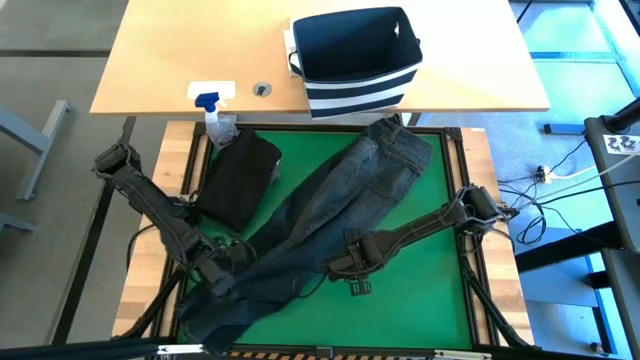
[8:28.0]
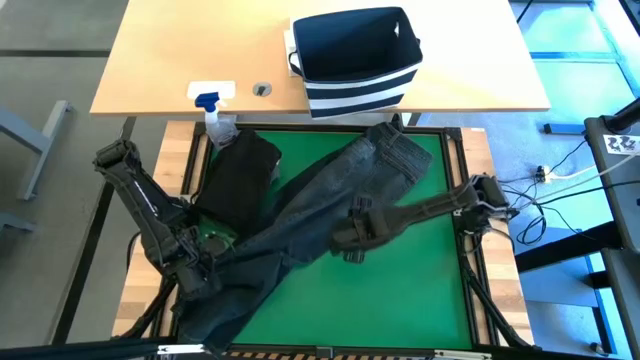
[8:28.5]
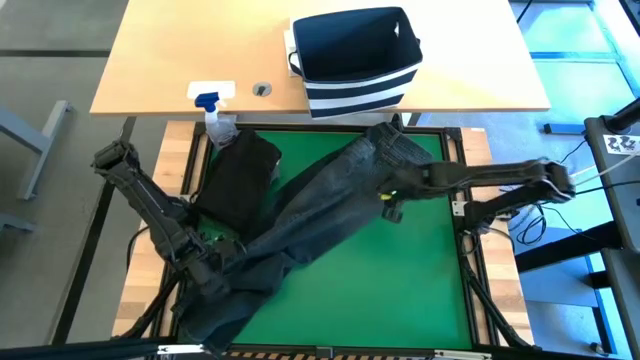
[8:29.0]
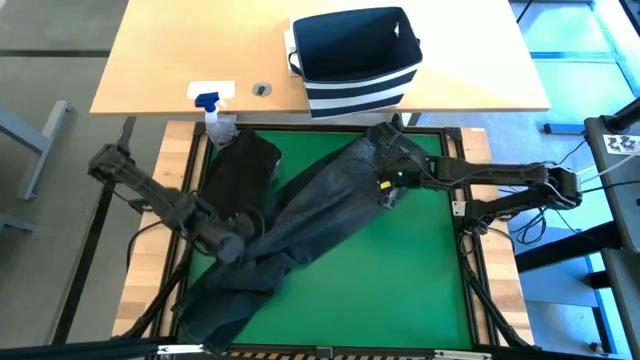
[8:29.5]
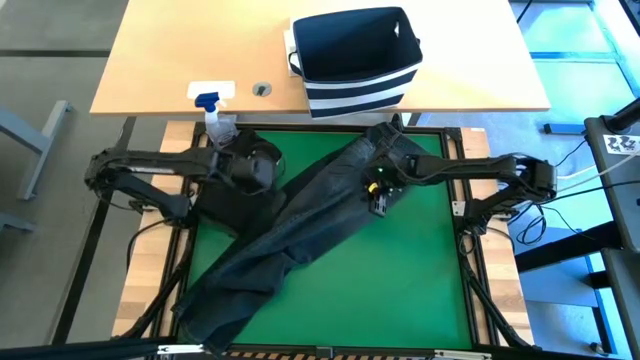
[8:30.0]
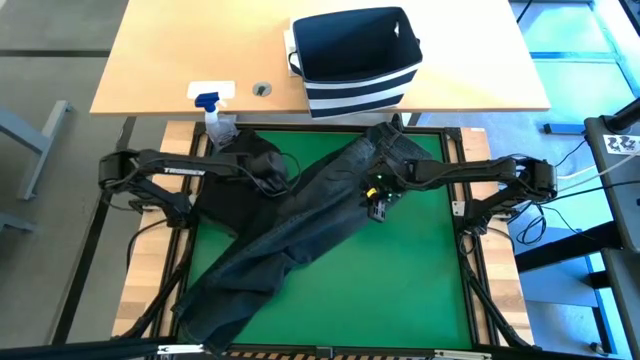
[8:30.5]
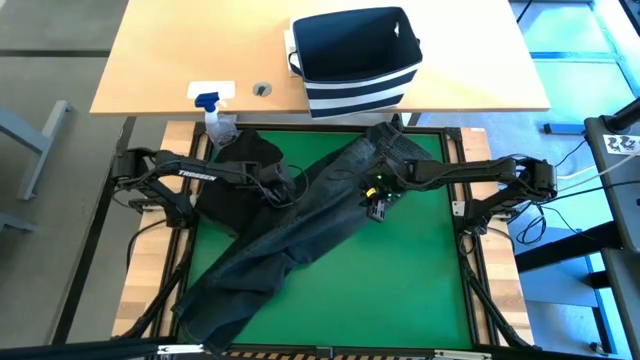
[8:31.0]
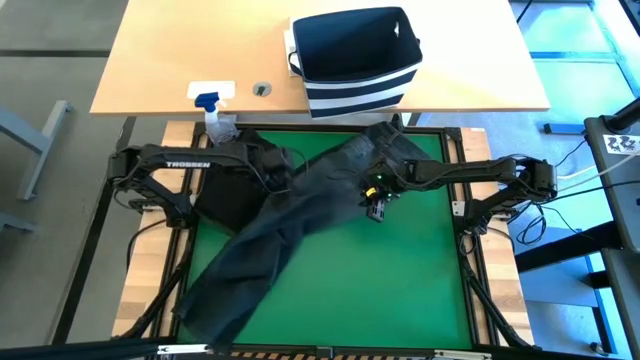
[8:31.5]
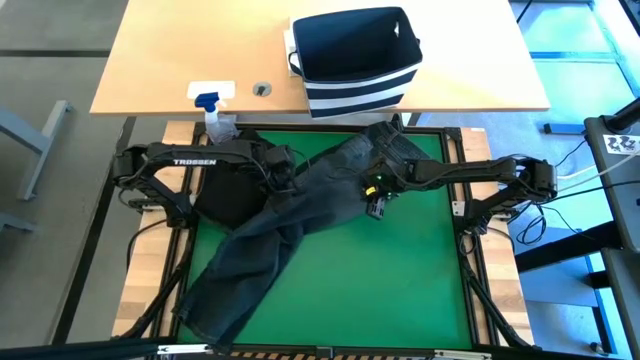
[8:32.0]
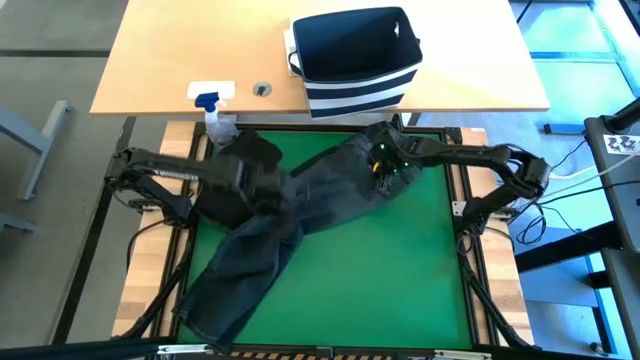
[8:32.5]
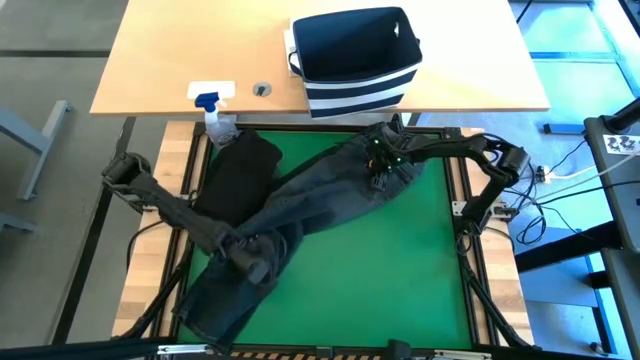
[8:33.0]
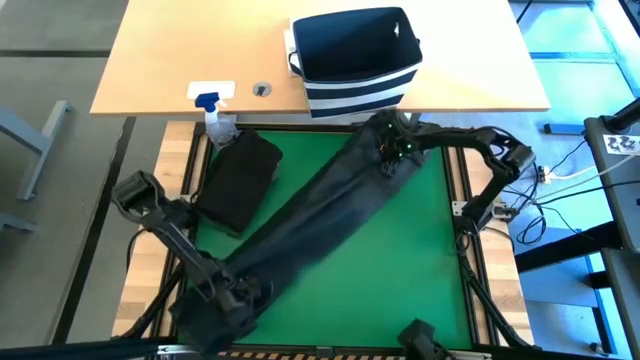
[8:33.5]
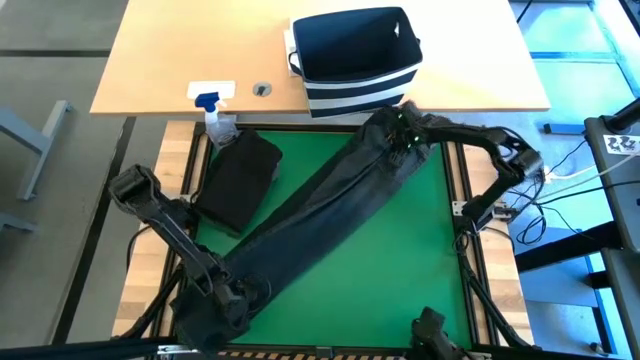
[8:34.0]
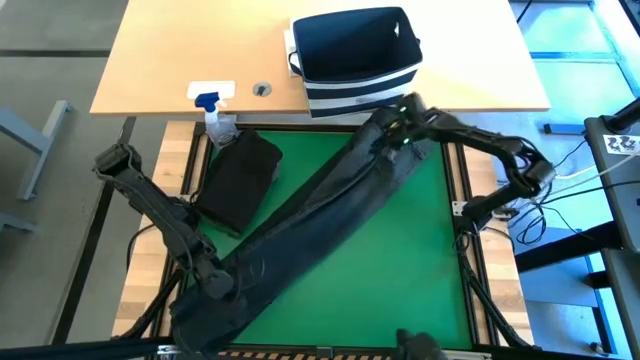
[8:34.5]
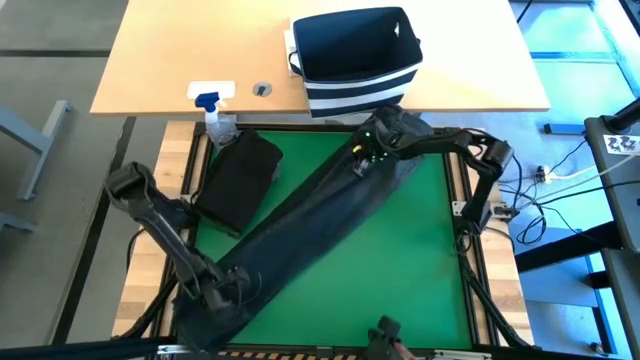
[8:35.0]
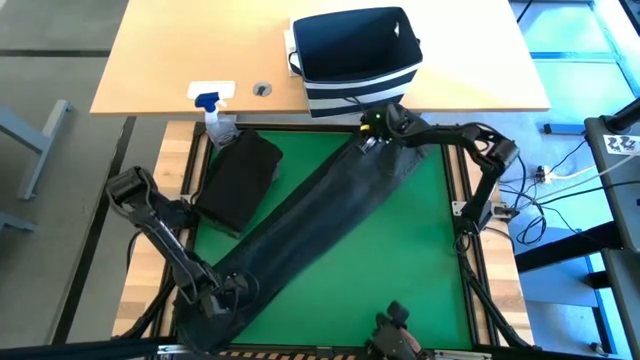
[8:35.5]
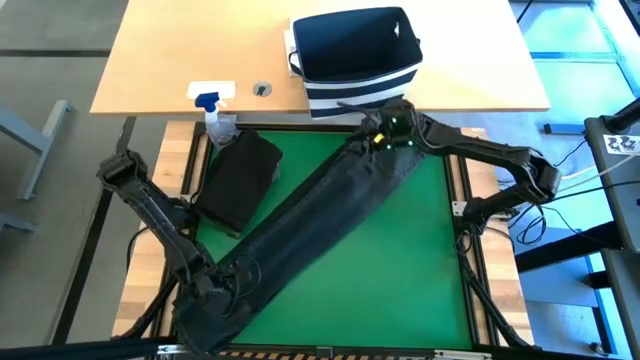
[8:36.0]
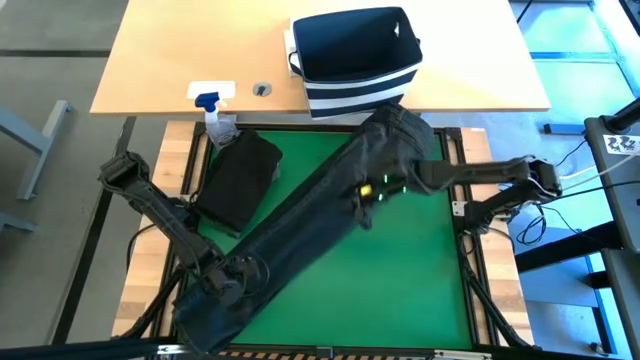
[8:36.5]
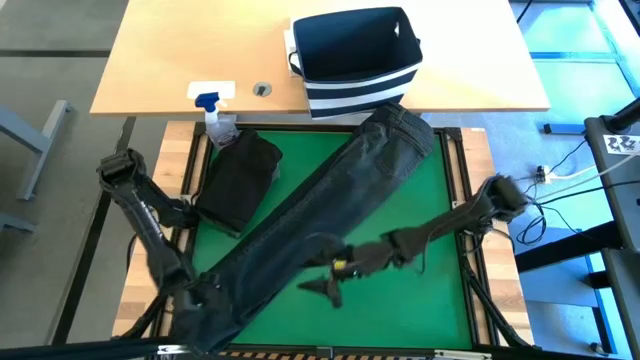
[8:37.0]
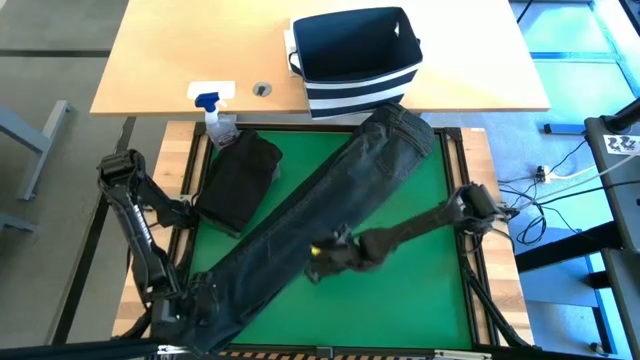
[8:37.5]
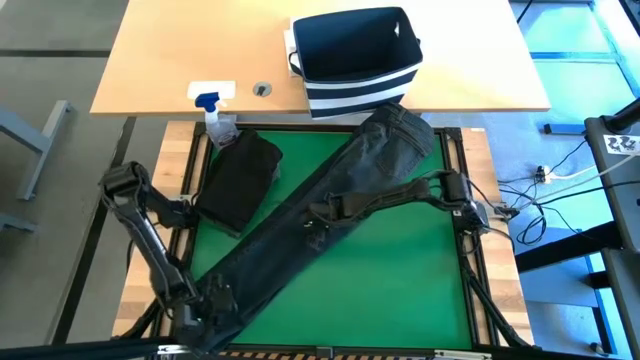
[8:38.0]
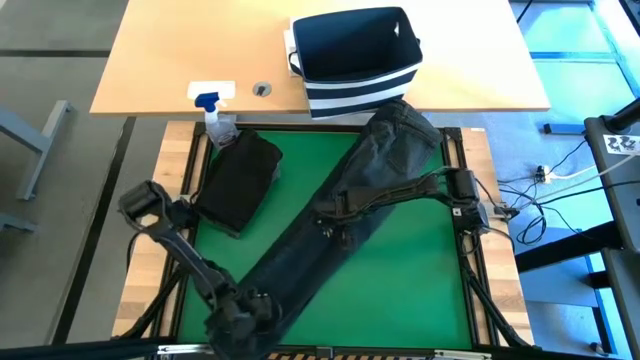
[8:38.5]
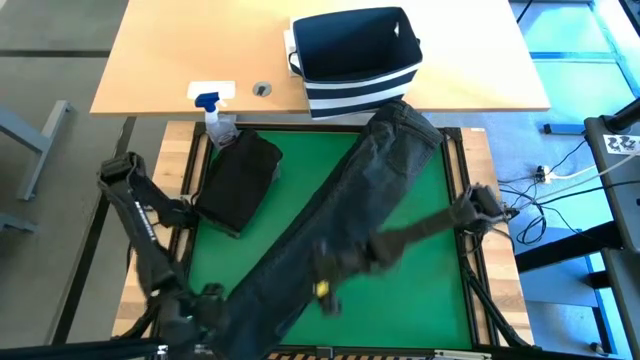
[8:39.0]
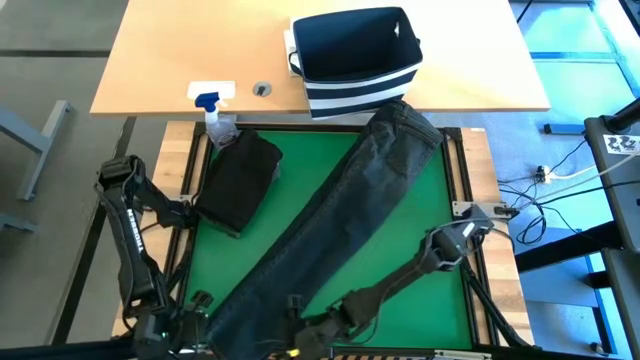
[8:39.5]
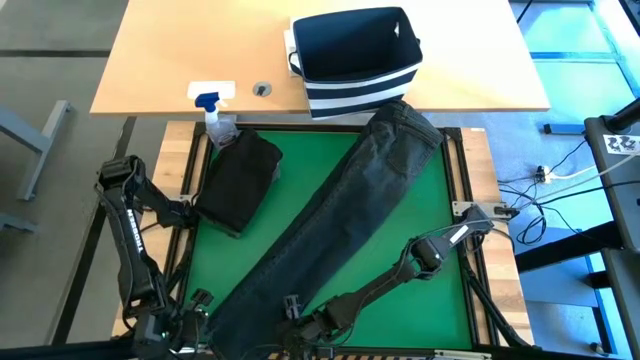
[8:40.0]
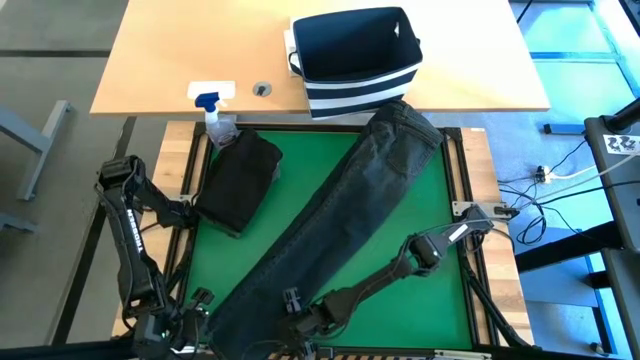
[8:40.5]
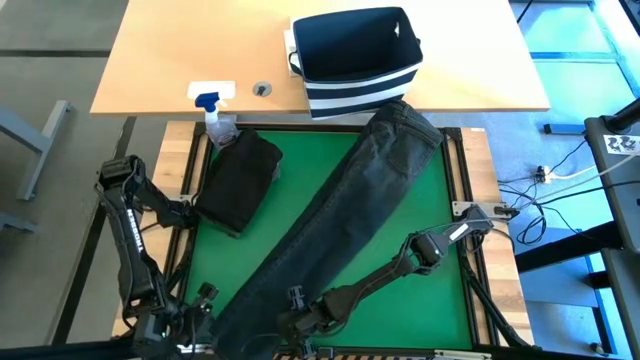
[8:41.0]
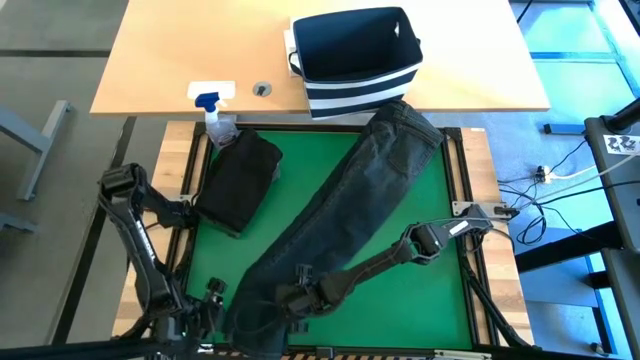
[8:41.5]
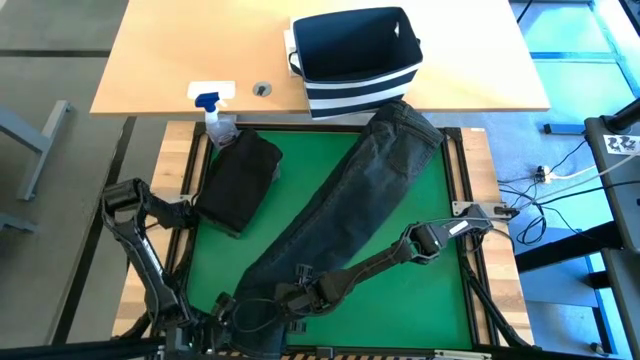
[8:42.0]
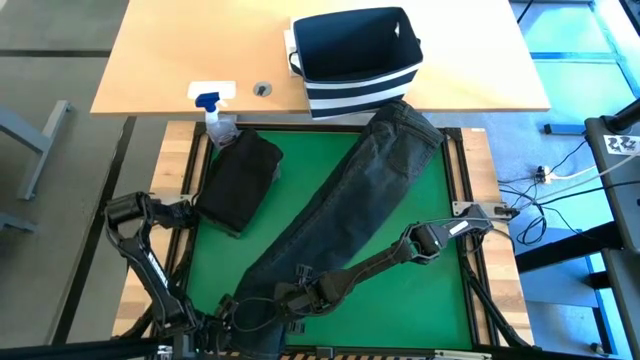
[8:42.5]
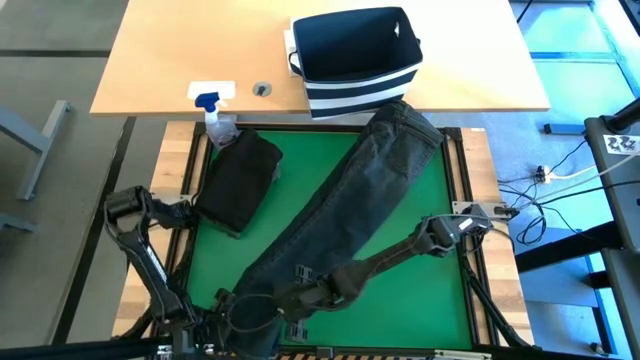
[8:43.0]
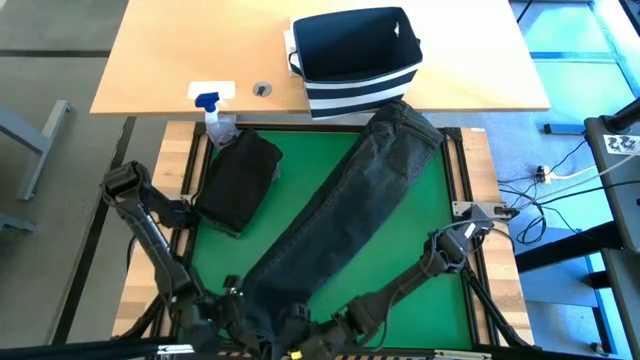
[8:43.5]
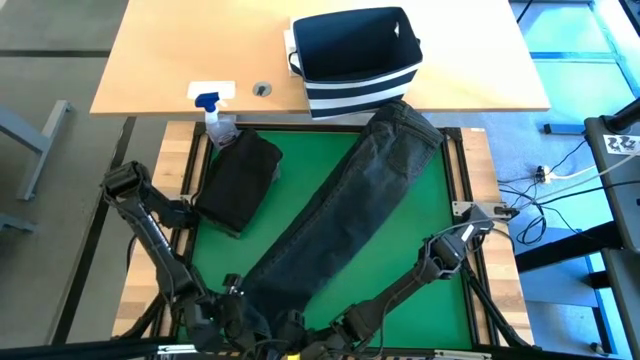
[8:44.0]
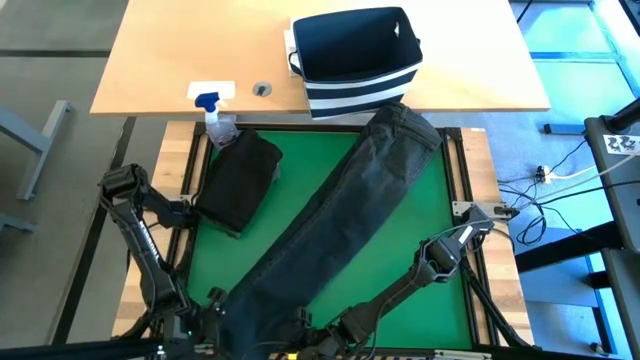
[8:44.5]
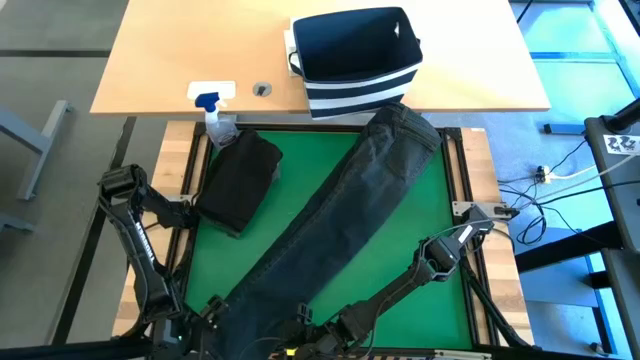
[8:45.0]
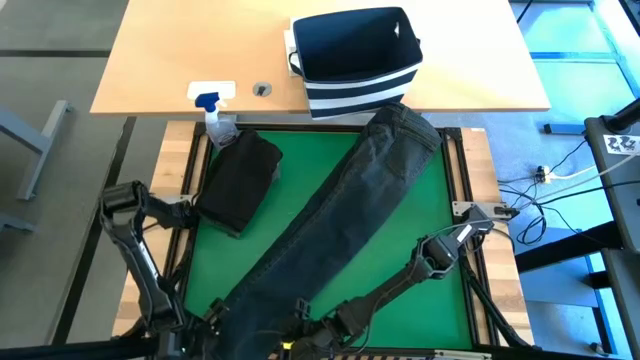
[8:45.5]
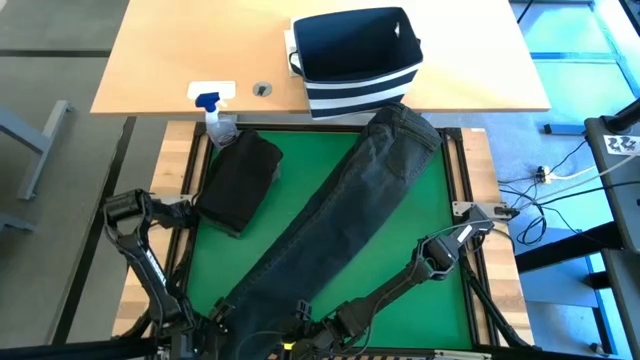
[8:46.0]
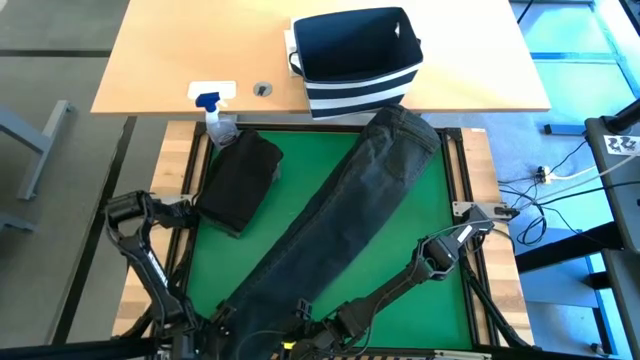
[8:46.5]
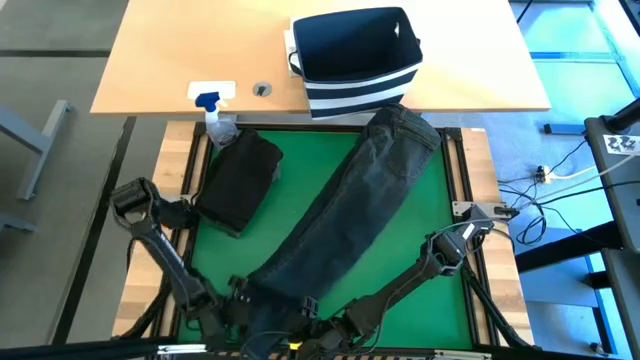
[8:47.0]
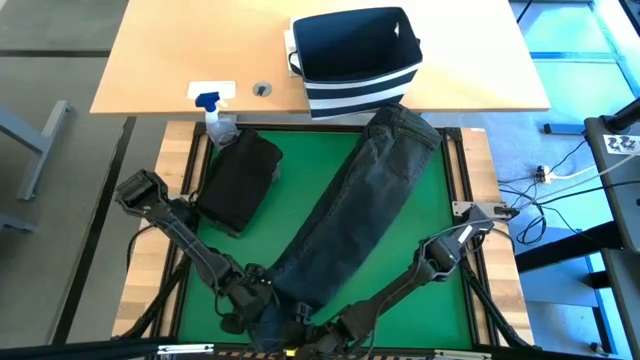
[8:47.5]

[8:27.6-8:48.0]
Task: Fold Laundry from Bin
Fold the blue pants
